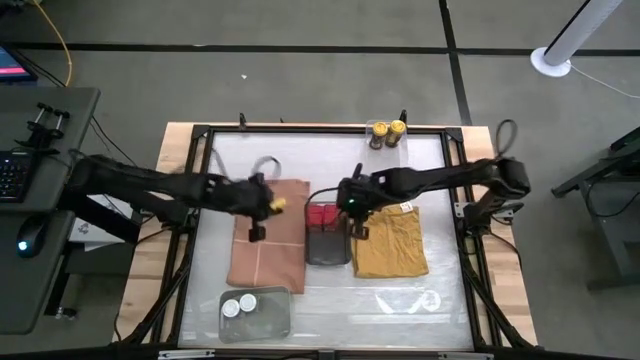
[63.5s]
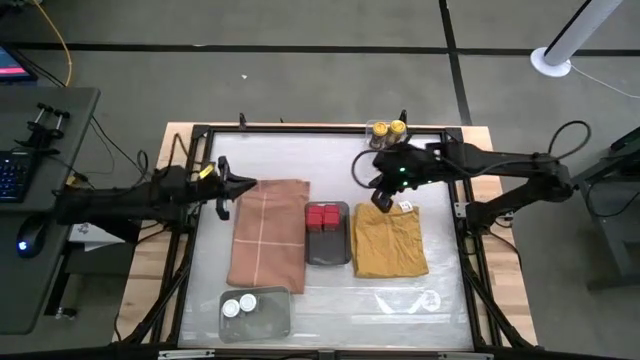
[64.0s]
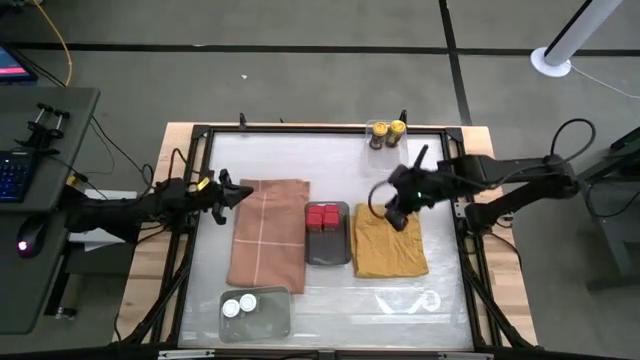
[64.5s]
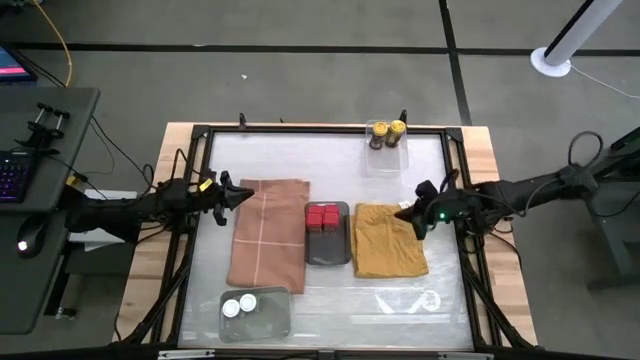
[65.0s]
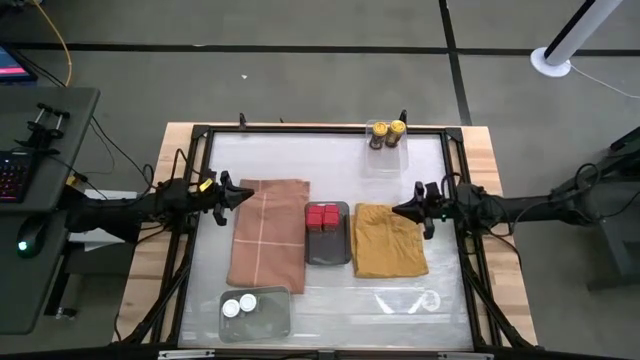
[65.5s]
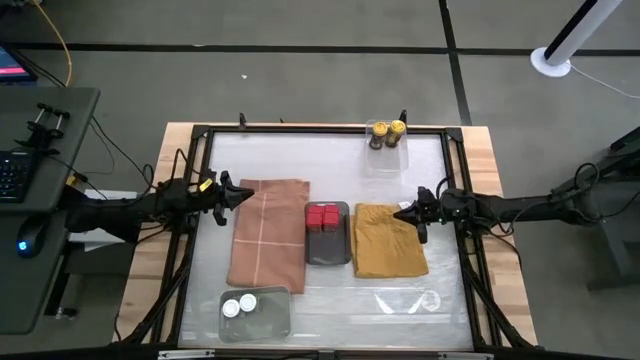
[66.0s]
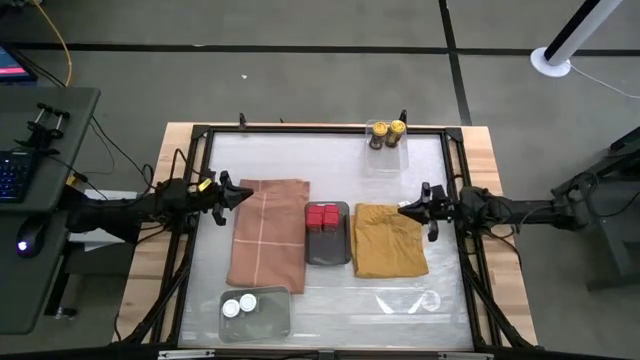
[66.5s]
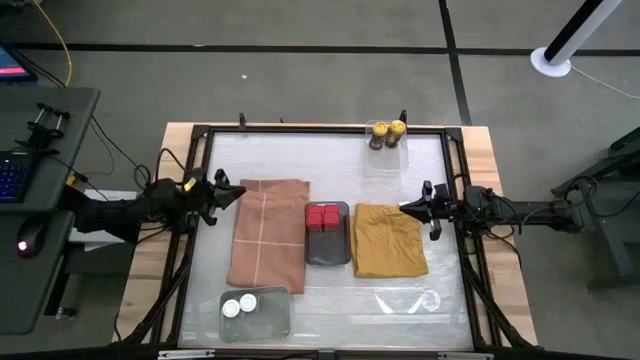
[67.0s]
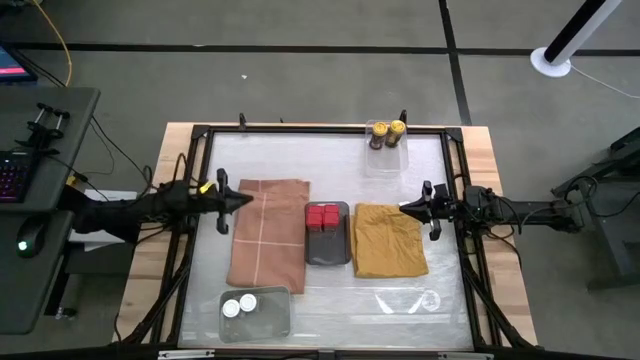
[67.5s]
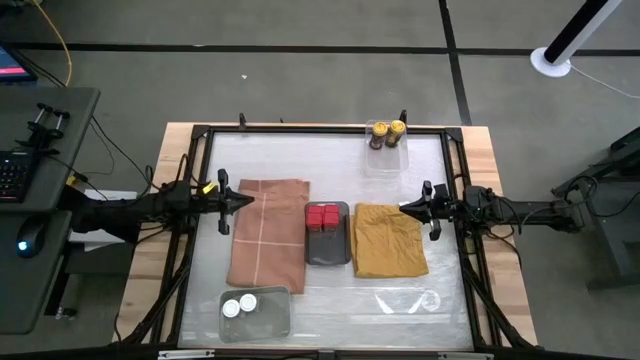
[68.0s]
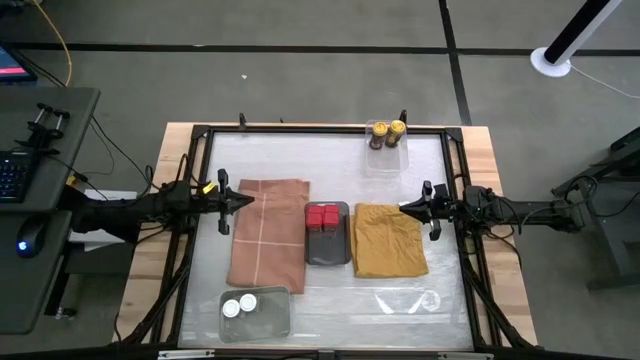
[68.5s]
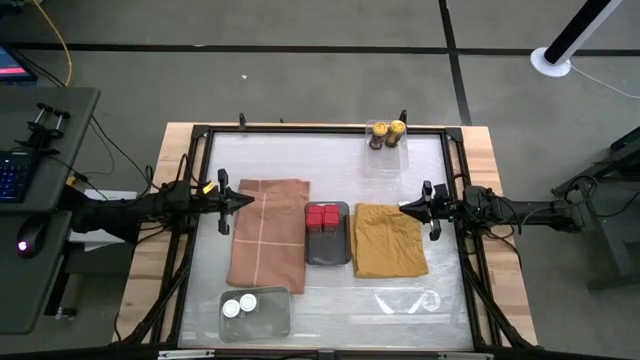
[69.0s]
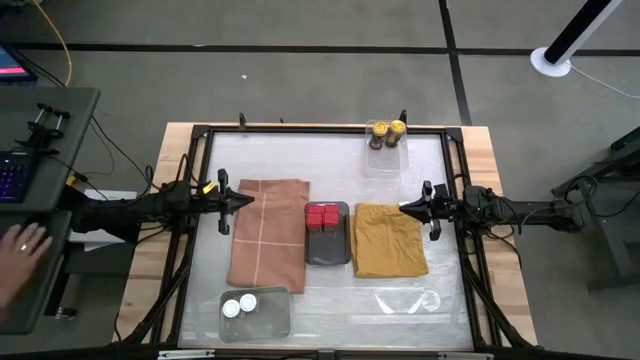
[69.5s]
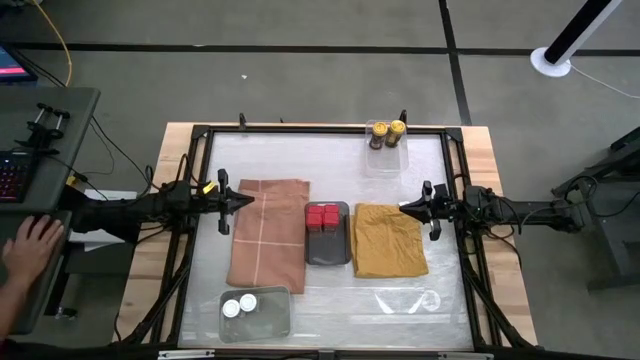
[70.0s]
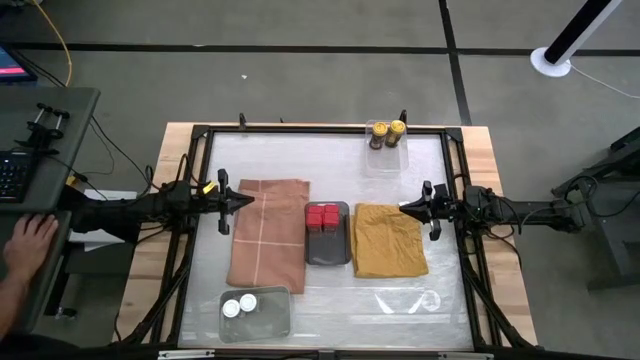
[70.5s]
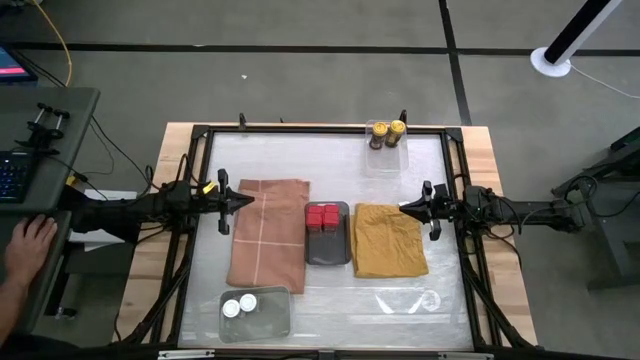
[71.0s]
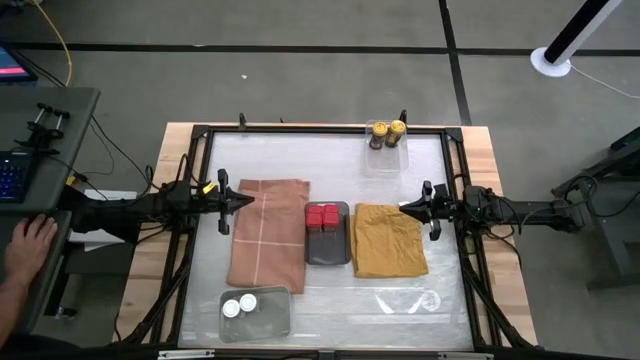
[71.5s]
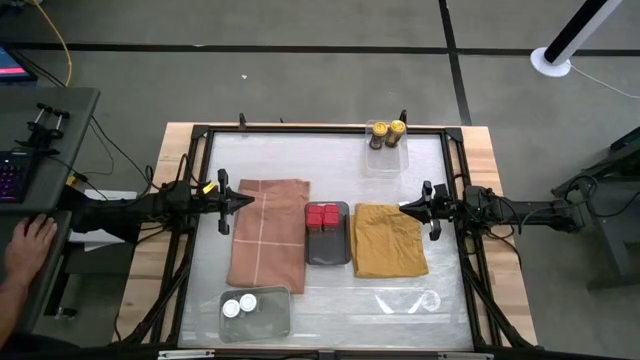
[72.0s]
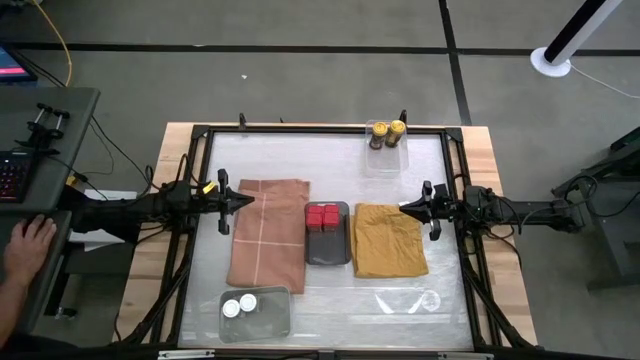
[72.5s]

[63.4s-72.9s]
Task: Sort spices by type
Return to Home Position

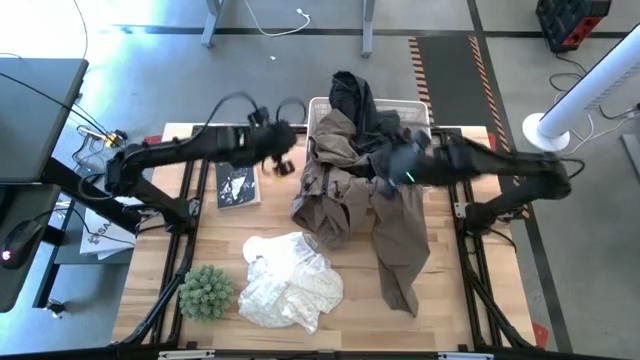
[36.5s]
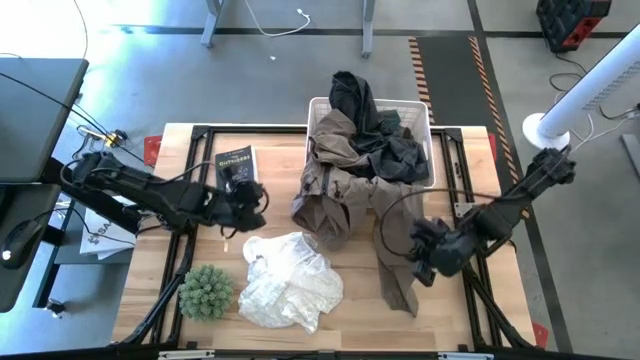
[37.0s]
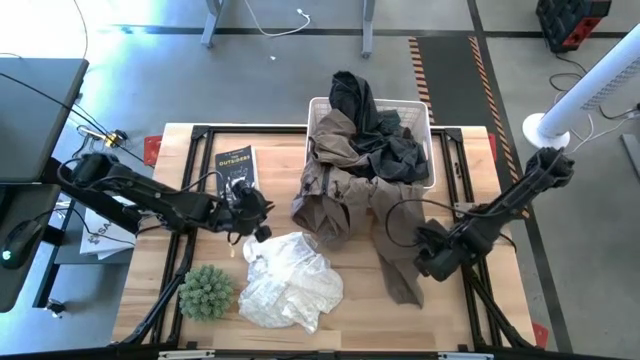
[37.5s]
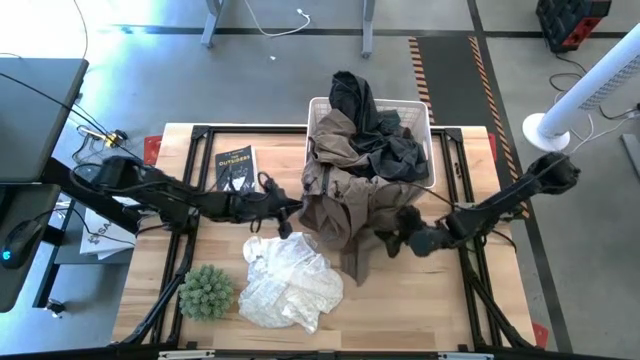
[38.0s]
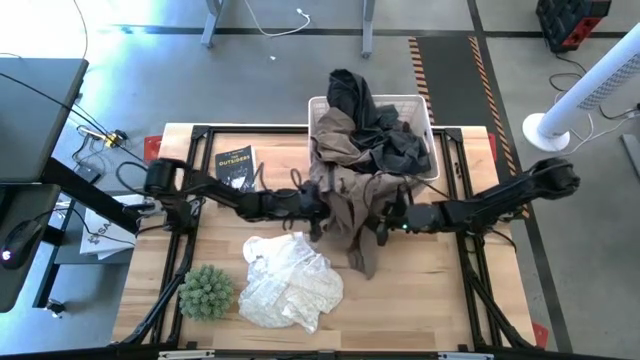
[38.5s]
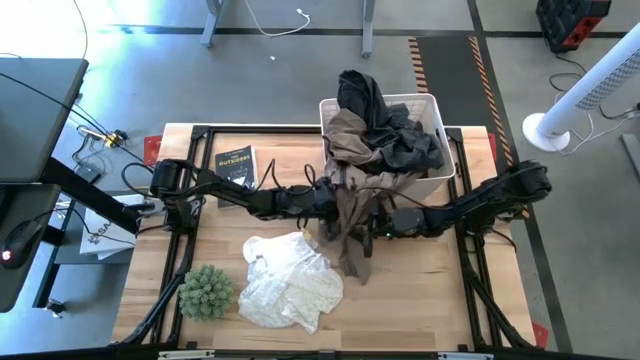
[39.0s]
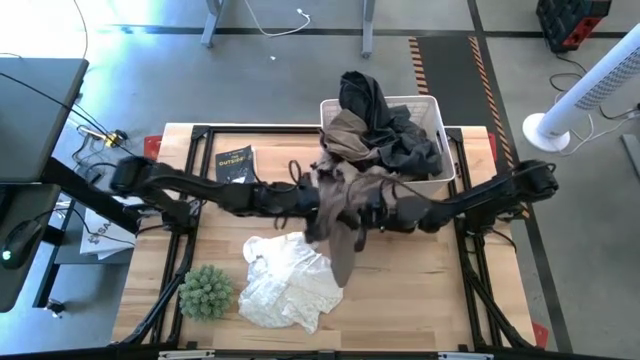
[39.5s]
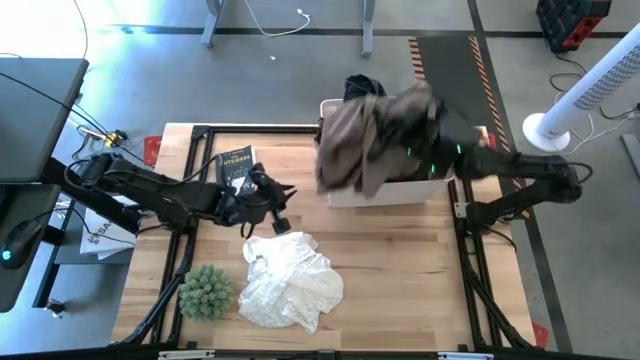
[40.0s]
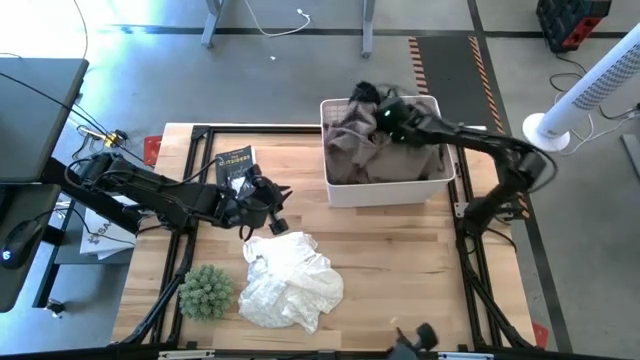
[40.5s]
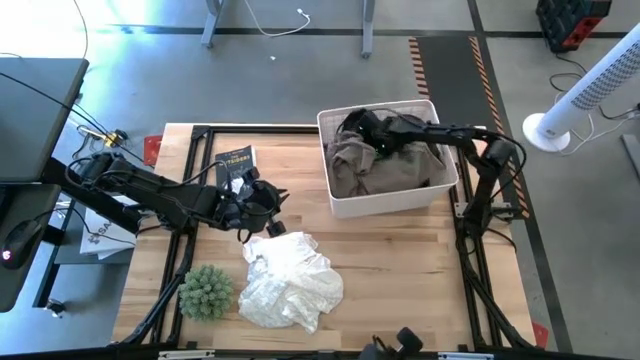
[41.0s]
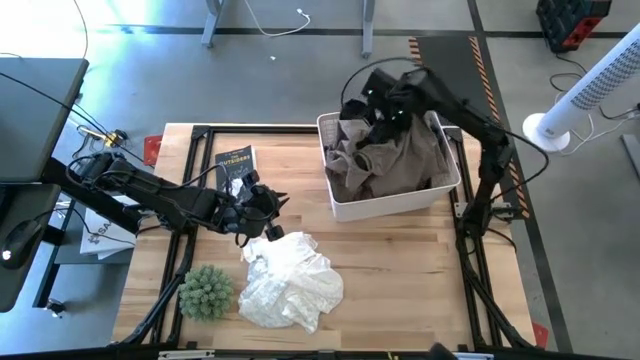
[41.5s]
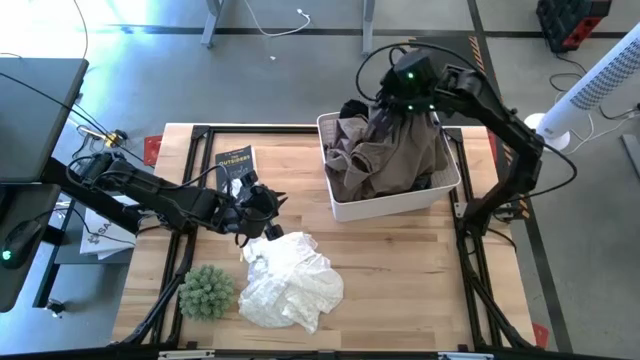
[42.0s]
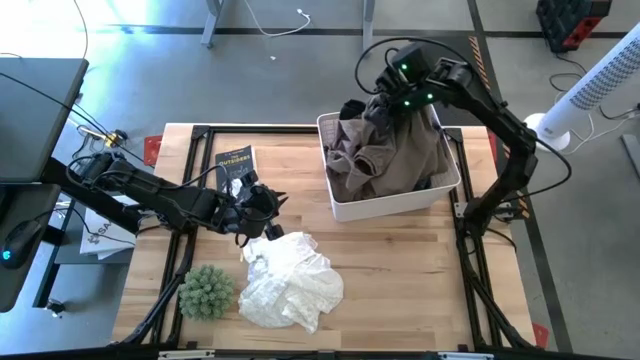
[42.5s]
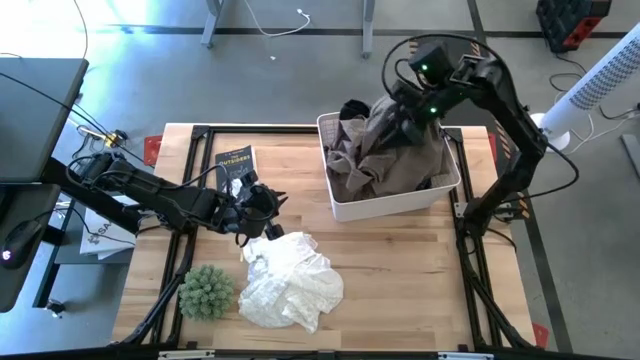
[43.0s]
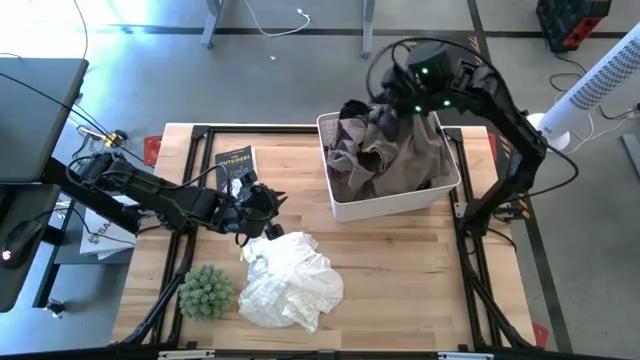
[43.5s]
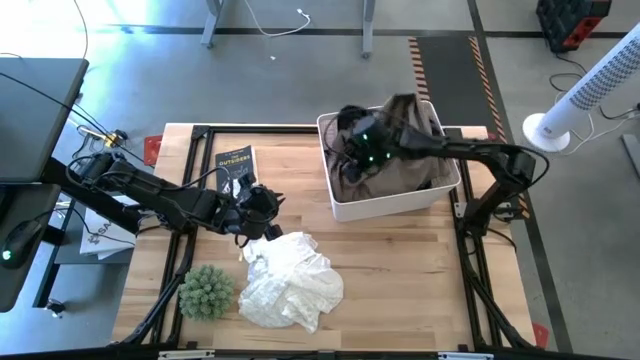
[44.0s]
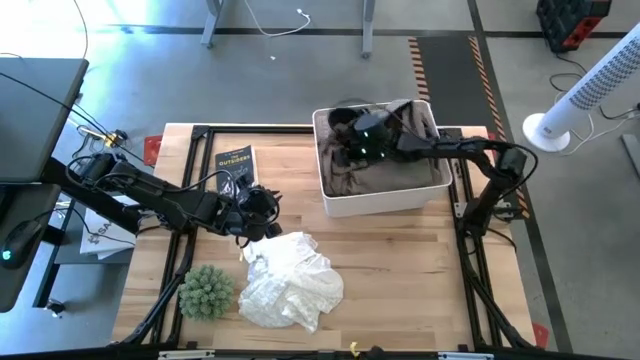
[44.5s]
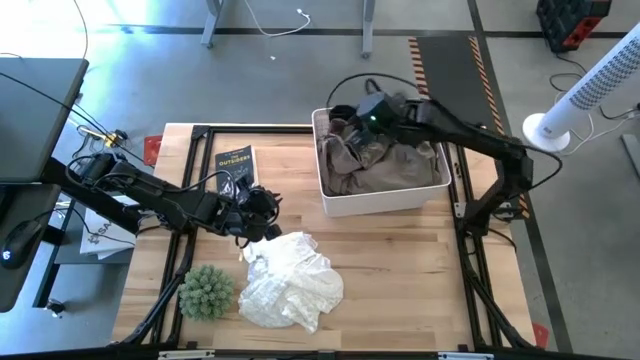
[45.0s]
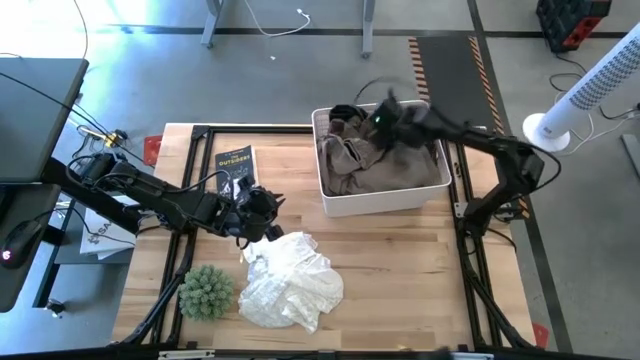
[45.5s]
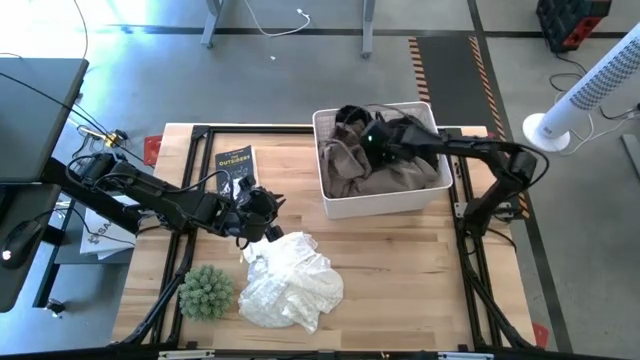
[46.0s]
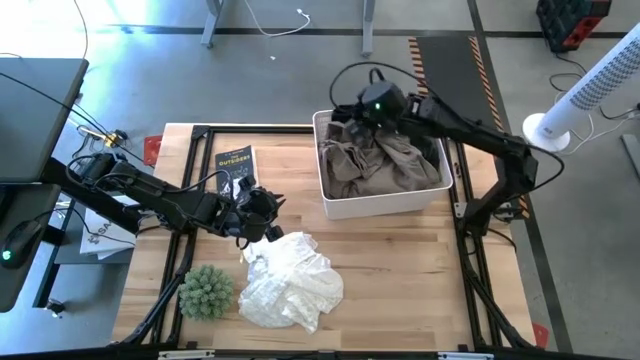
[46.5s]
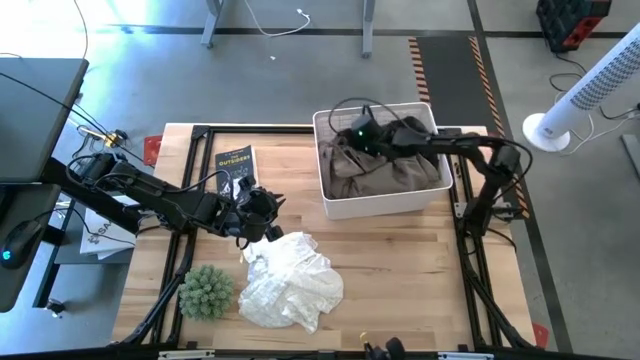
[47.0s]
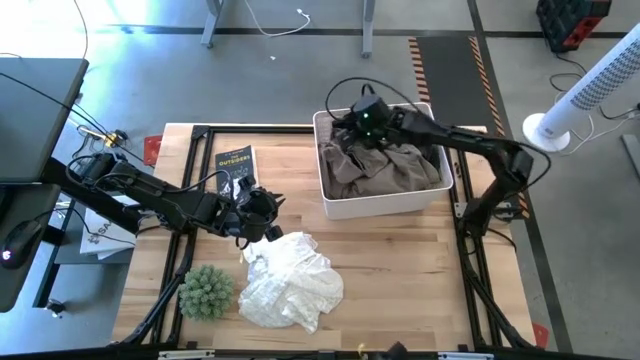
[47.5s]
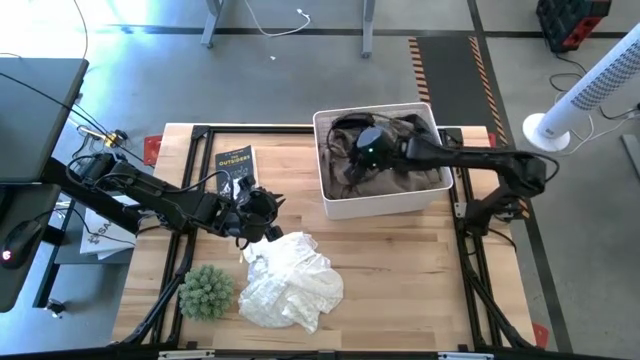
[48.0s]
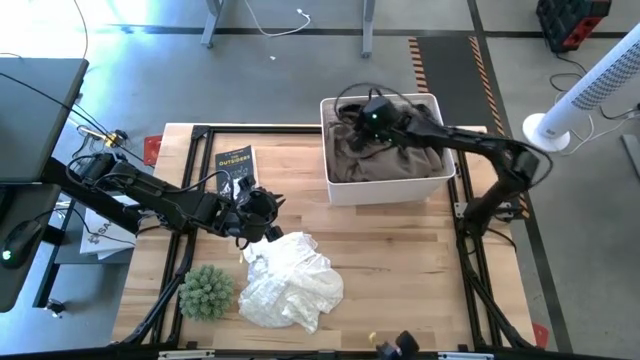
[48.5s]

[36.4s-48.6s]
Task: Sort clothes
Put the brown and black jacket into the white bin
